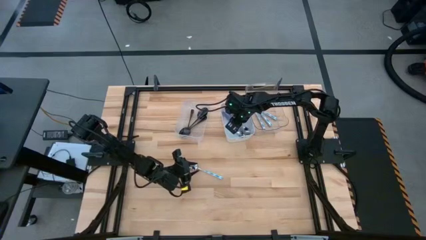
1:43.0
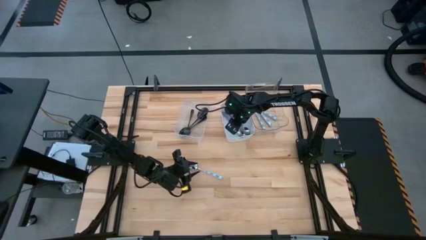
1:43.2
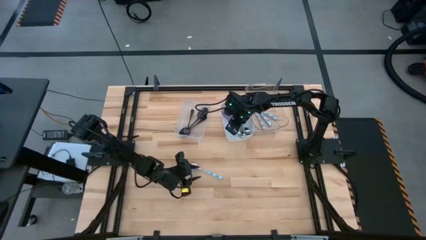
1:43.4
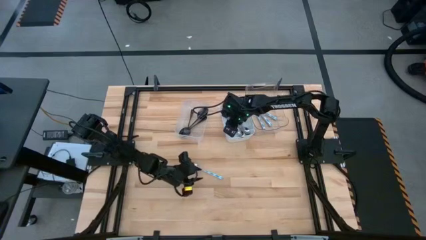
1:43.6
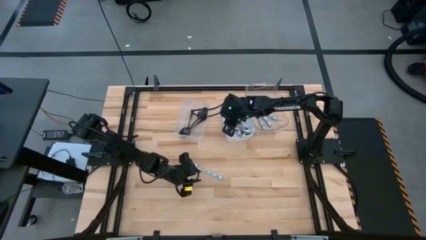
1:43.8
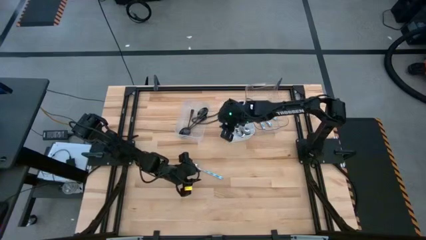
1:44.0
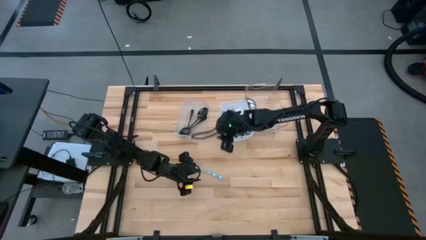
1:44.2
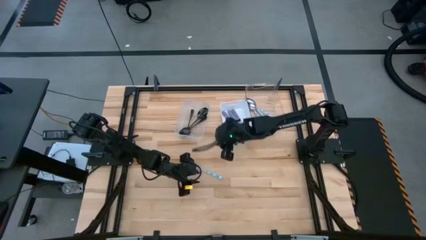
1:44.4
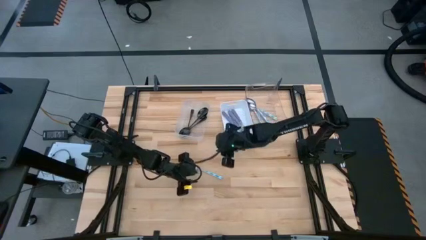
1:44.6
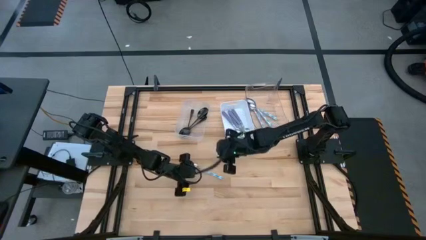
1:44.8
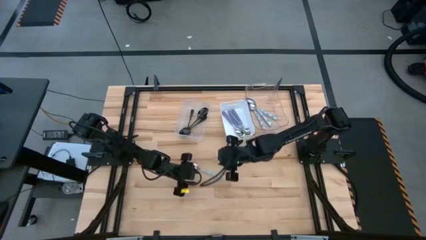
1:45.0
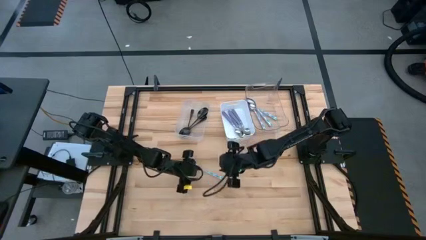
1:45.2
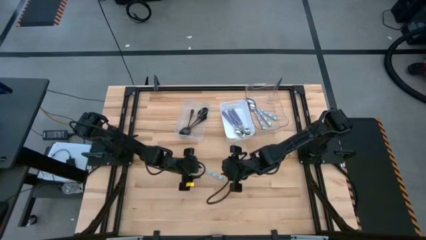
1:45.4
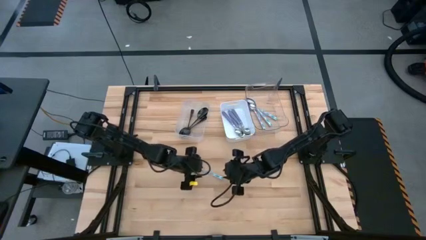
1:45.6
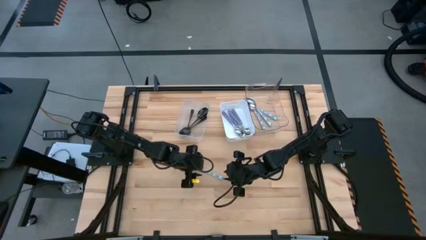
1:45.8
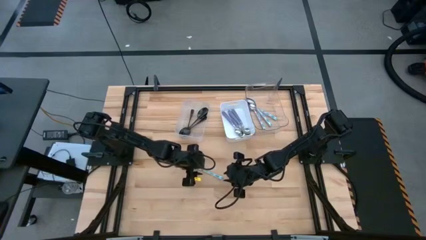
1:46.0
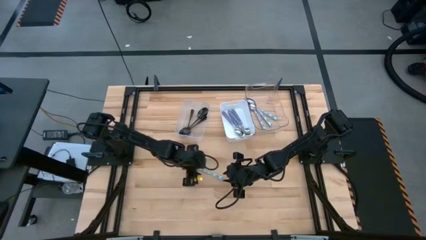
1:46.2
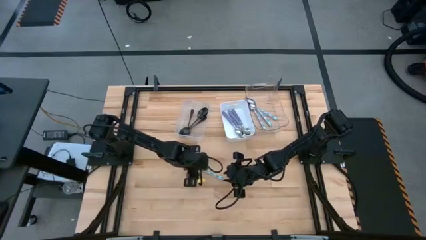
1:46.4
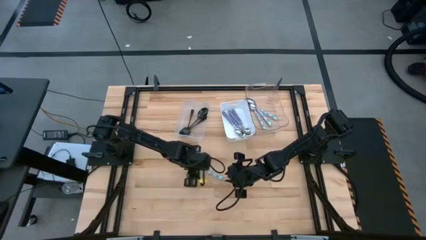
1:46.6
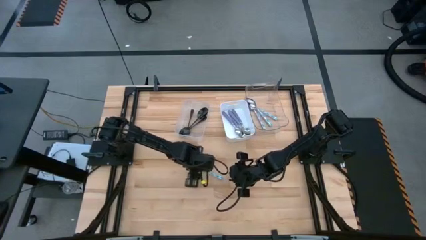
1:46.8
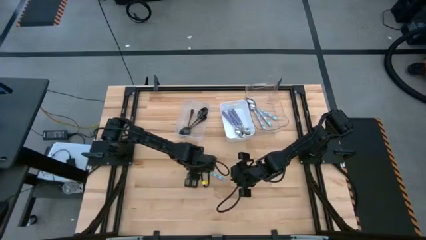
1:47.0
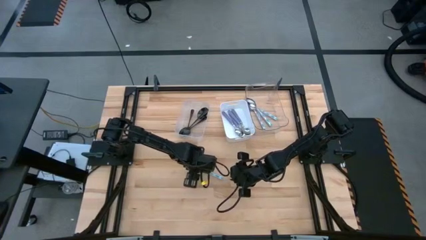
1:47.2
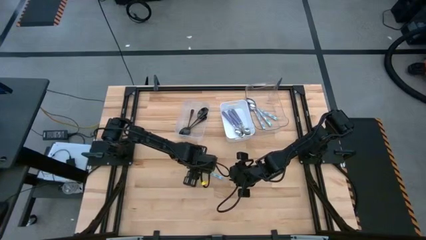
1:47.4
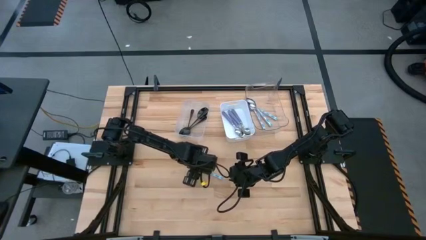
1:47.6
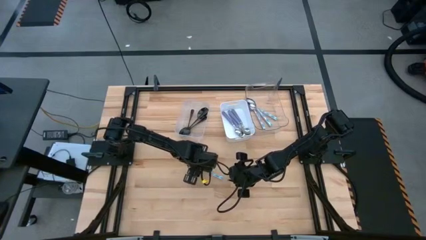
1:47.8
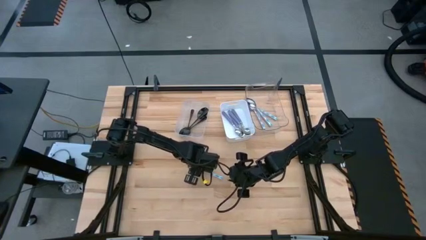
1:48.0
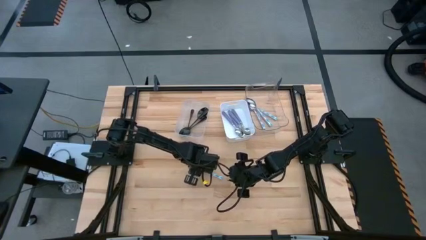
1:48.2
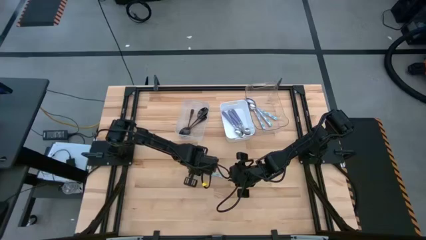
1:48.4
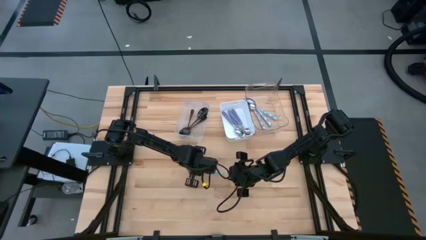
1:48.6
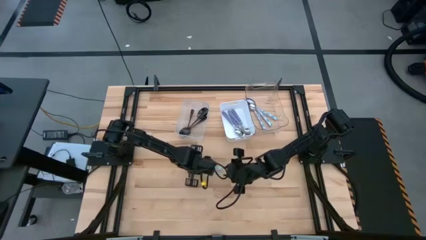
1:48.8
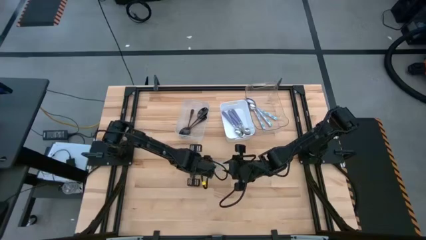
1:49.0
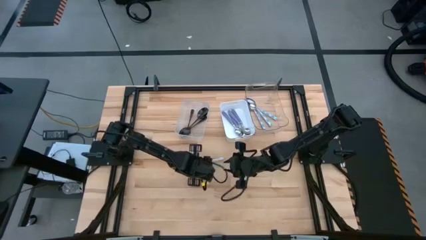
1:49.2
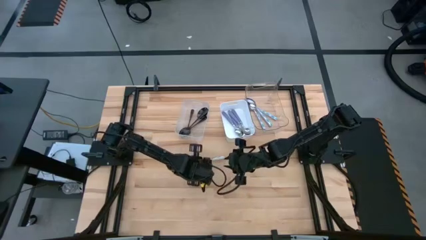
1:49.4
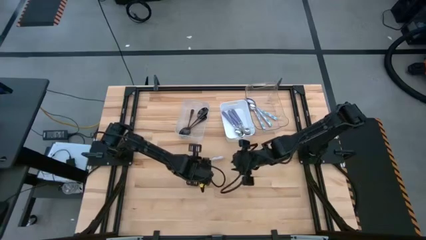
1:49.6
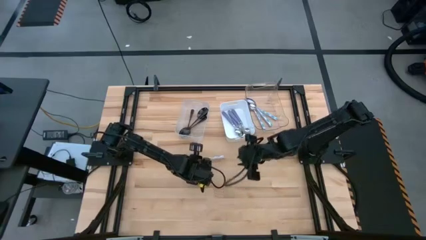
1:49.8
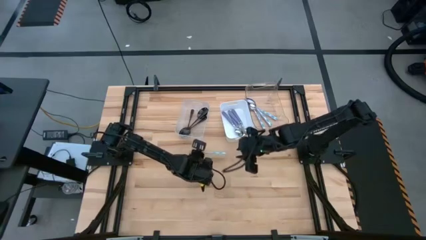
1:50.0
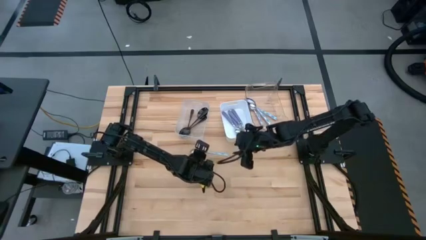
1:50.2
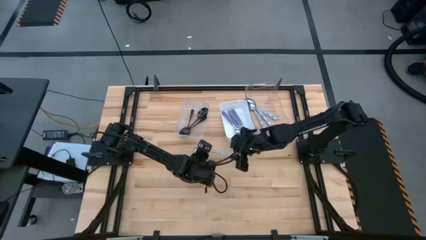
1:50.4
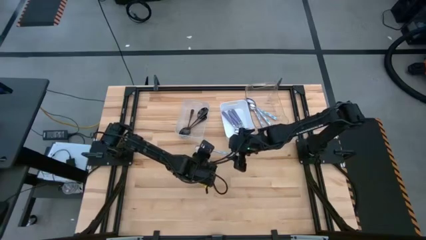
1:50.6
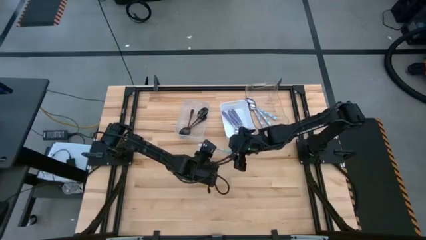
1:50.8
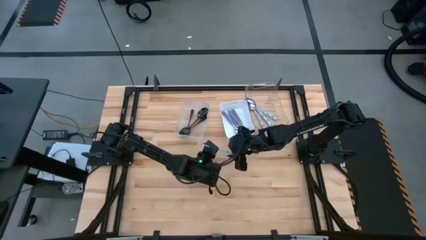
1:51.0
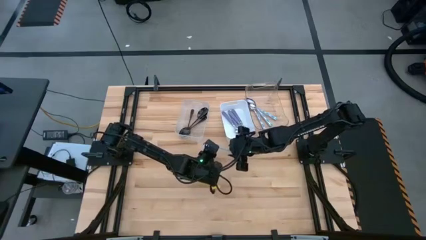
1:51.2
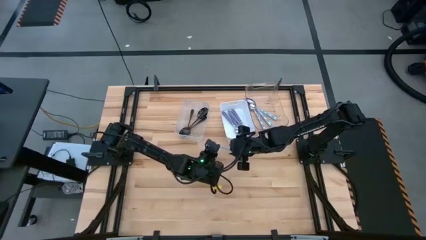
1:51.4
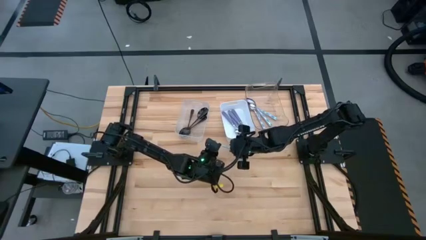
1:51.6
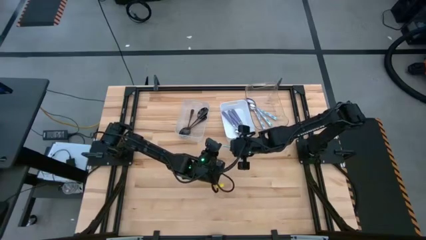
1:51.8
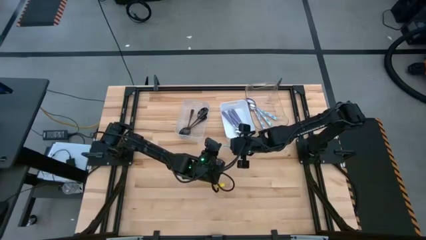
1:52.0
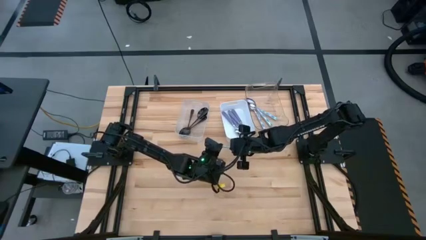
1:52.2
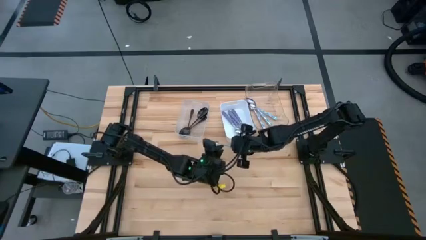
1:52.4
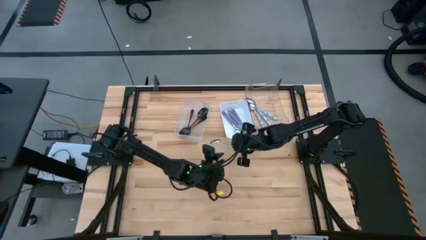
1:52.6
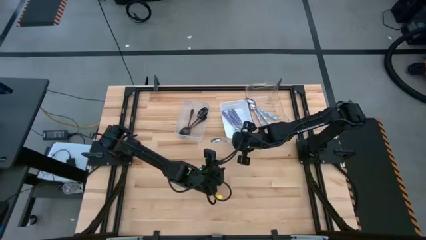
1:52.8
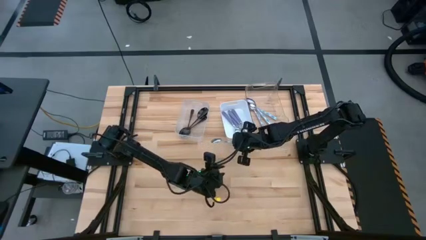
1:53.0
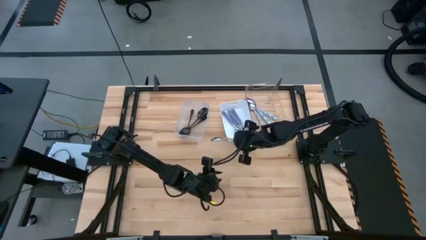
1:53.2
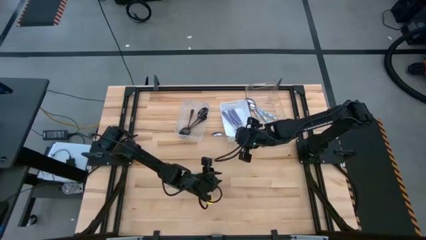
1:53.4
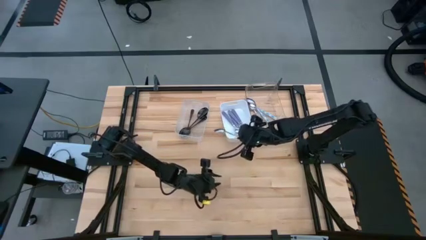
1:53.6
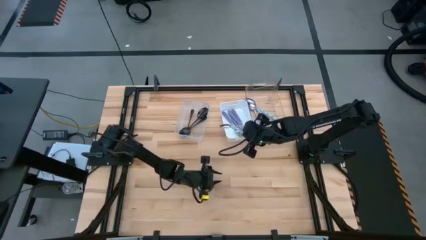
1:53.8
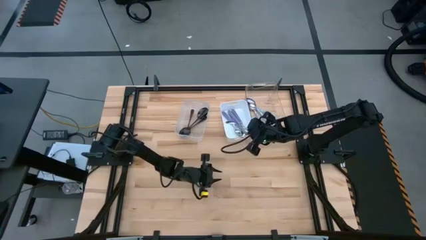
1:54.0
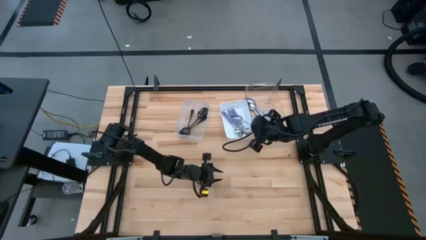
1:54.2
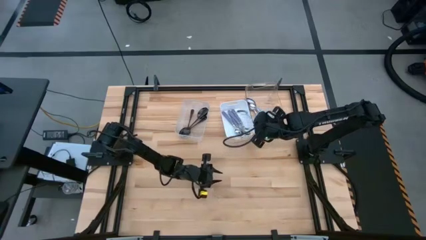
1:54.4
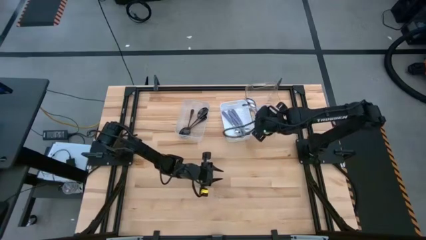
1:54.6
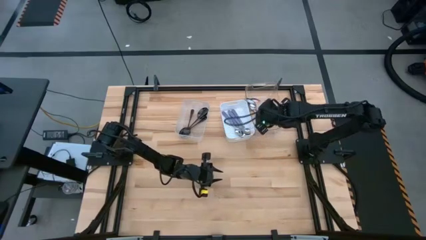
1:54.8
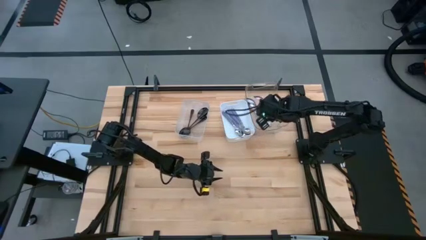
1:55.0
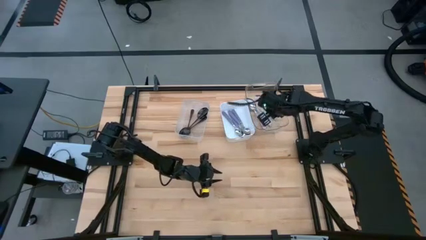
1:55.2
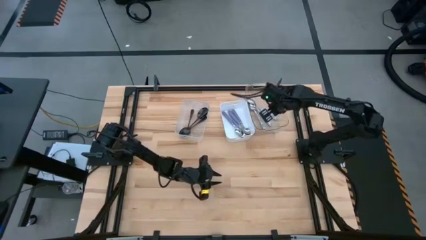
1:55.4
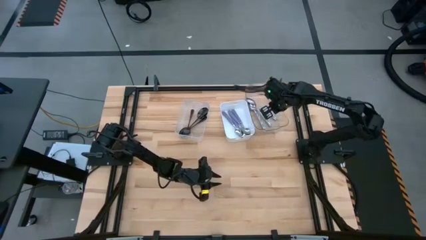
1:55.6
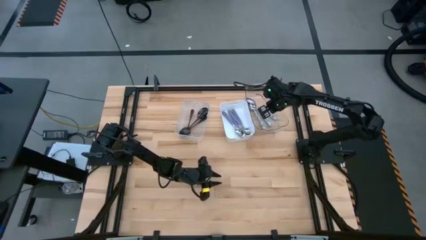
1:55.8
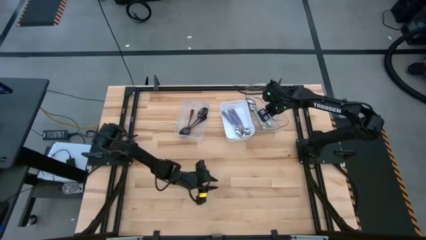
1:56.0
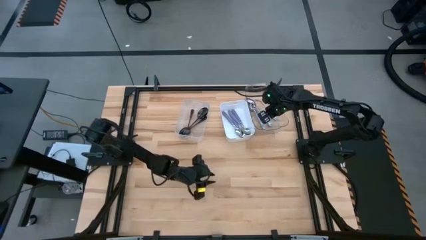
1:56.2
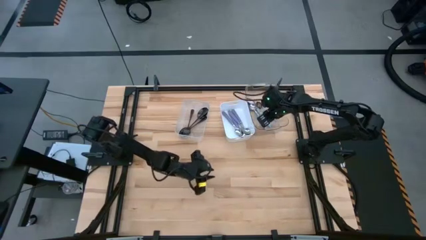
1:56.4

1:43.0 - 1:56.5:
Task: Sort silverware by color (type)
Put the blue spoon into the right transparent bin

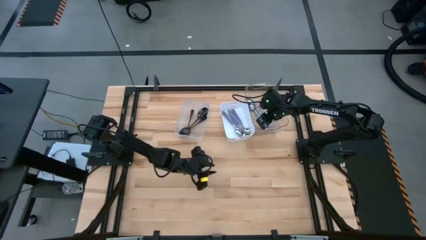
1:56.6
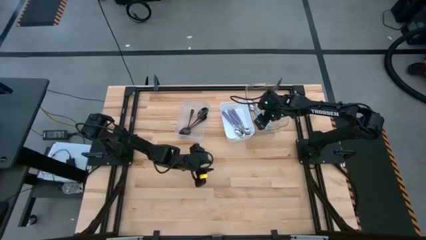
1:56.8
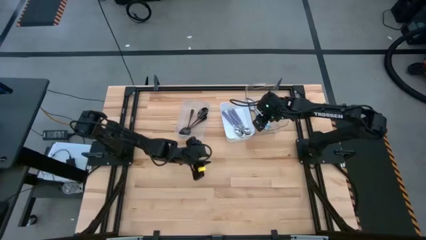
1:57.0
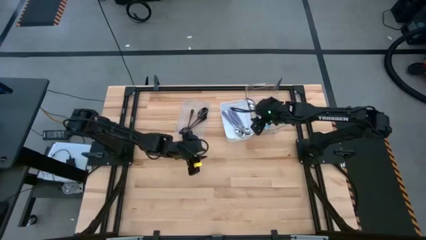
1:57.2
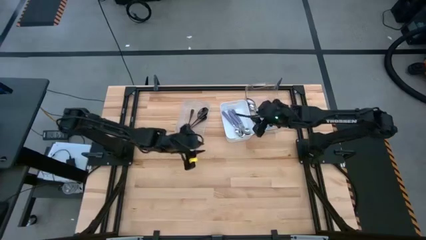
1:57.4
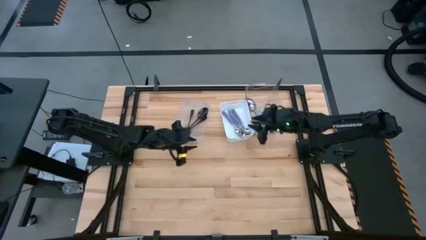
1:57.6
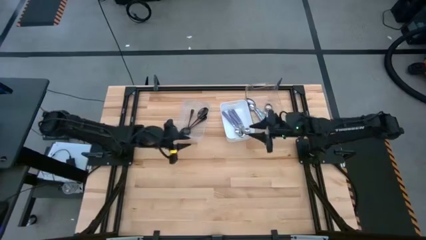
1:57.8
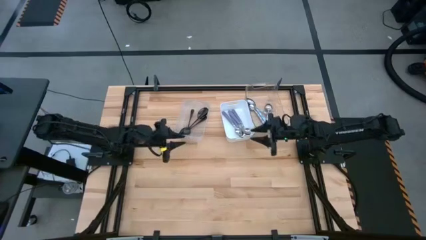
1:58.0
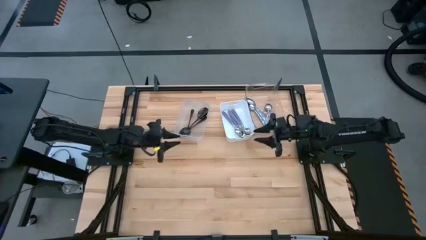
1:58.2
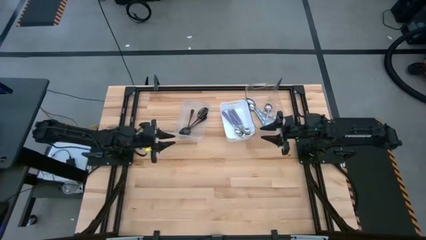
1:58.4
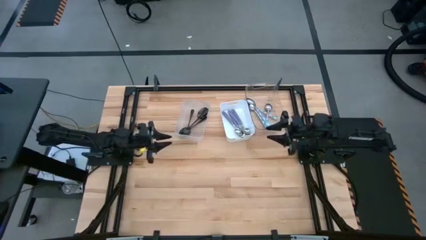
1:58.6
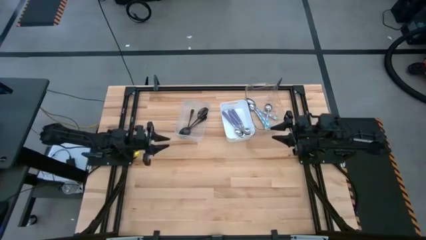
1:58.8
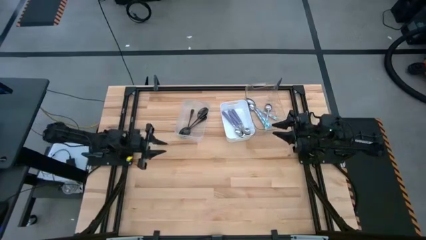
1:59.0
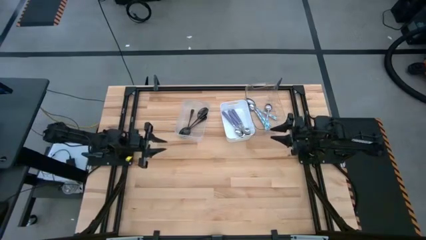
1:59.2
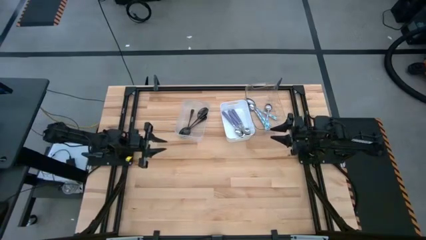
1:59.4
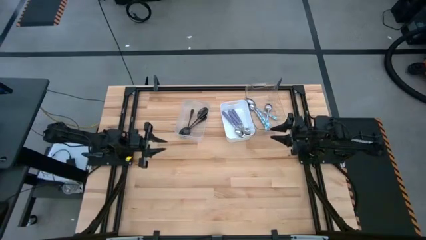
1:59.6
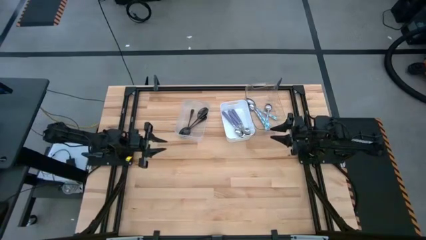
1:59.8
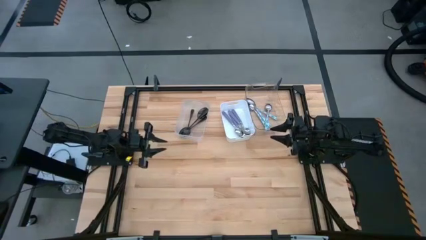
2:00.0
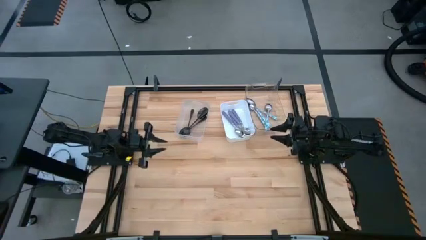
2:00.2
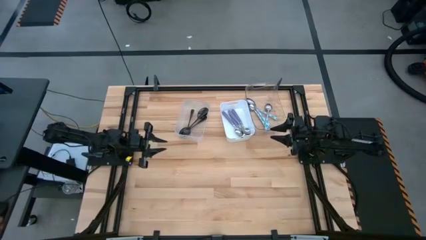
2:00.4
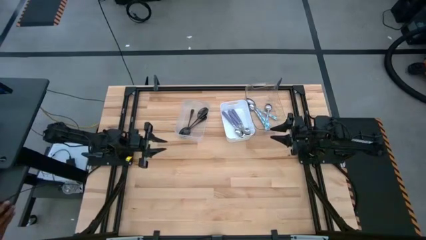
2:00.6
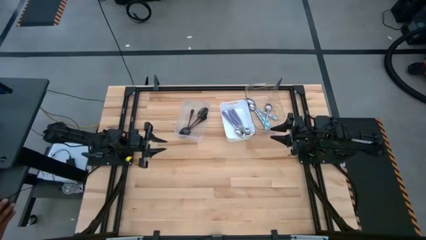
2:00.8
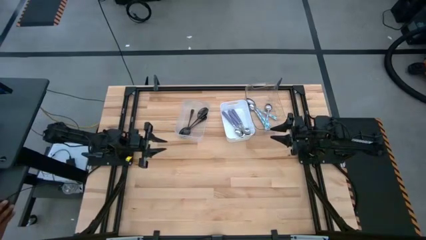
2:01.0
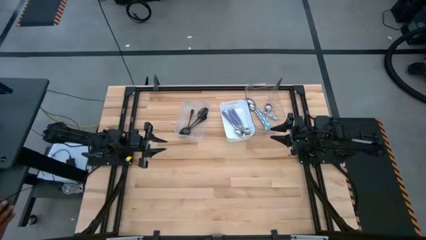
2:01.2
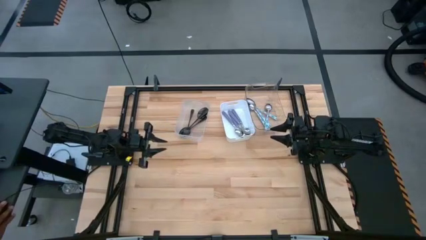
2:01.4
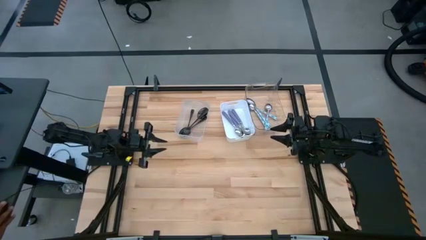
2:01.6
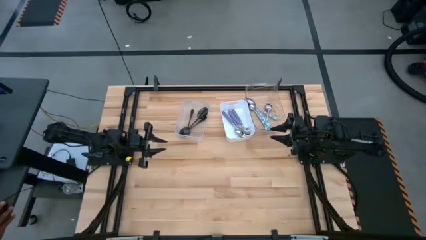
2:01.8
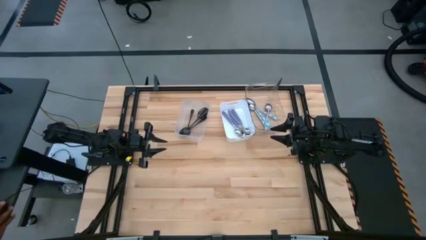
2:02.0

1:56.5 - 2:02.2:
Return to Home Position
